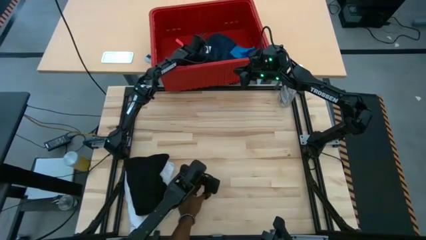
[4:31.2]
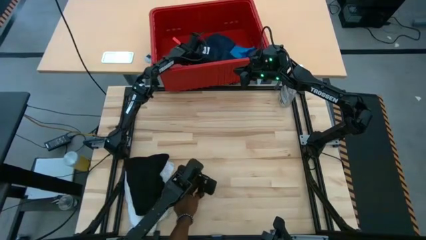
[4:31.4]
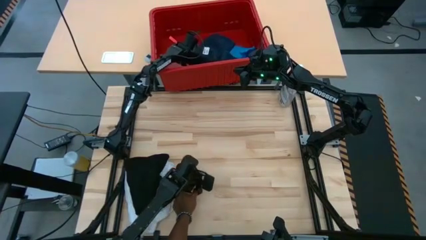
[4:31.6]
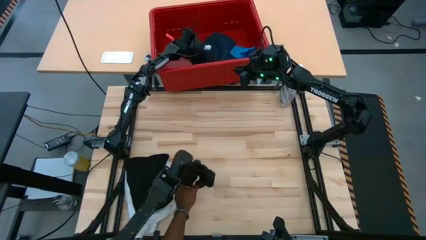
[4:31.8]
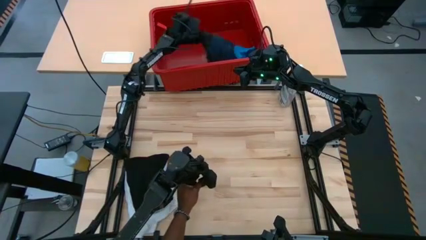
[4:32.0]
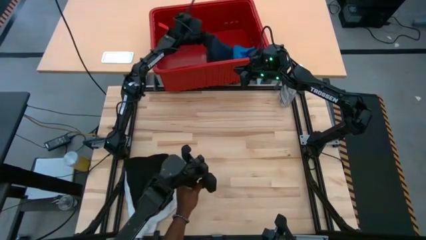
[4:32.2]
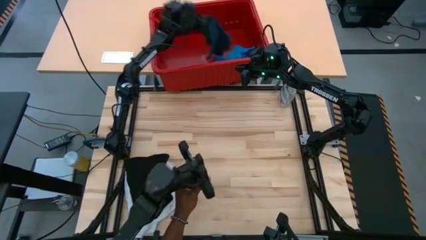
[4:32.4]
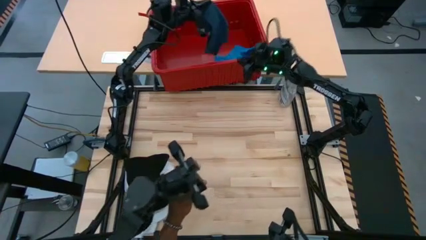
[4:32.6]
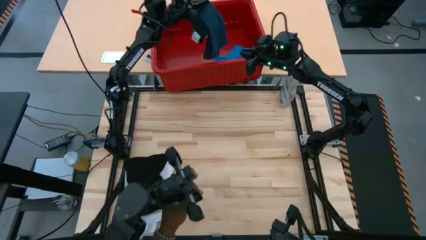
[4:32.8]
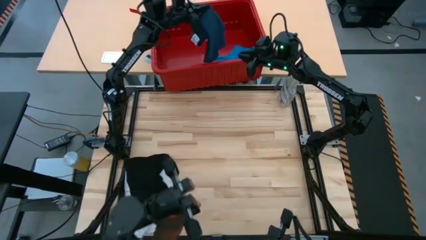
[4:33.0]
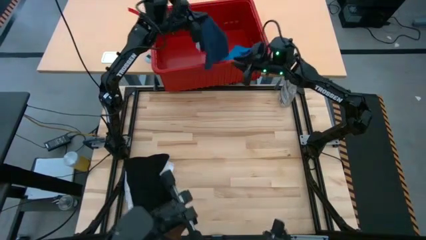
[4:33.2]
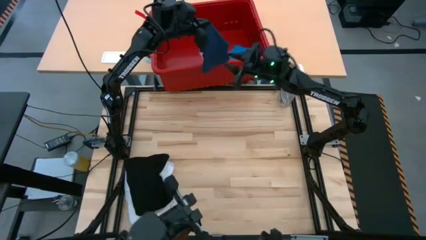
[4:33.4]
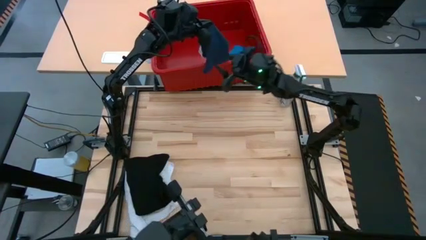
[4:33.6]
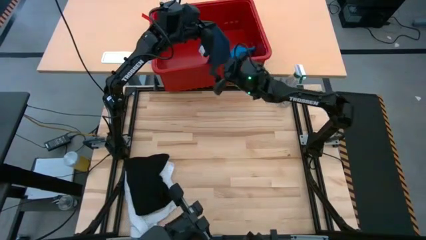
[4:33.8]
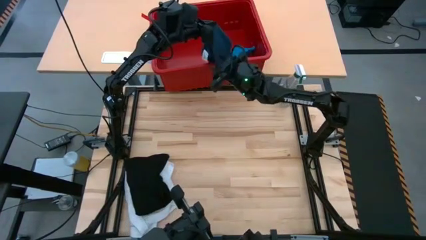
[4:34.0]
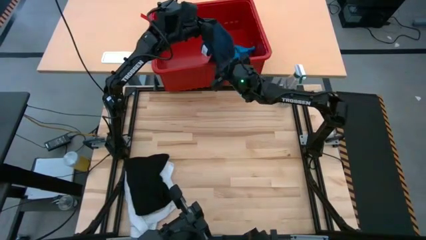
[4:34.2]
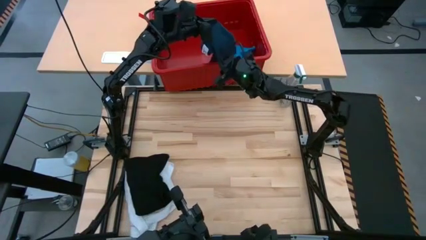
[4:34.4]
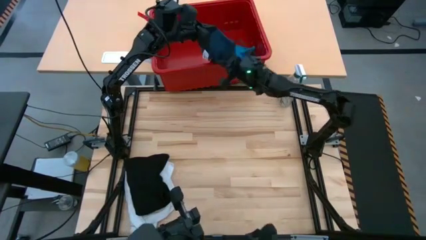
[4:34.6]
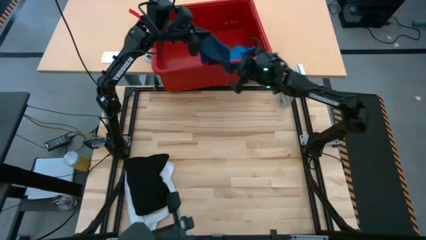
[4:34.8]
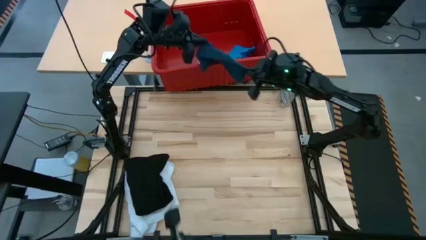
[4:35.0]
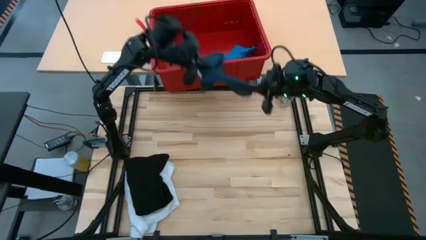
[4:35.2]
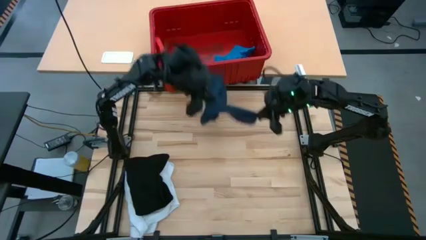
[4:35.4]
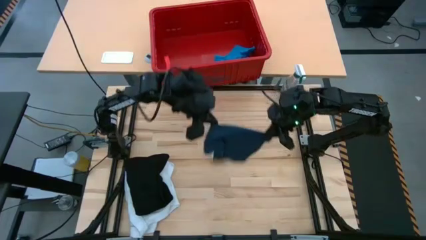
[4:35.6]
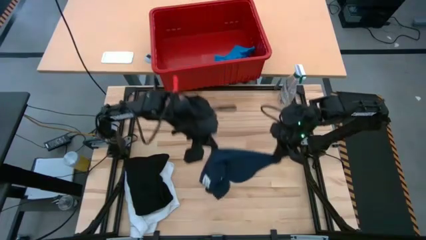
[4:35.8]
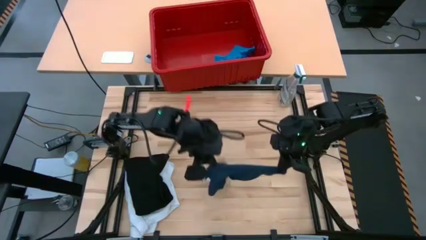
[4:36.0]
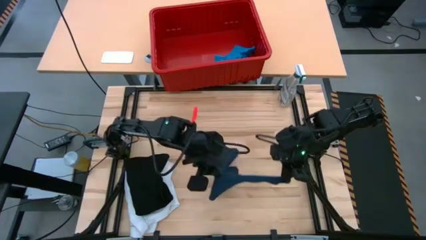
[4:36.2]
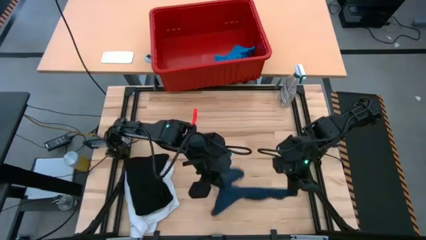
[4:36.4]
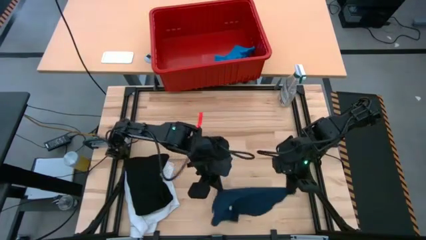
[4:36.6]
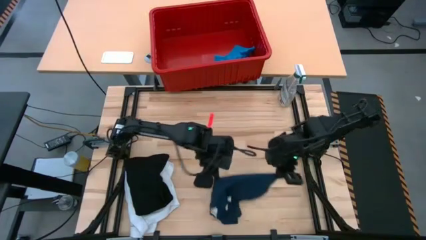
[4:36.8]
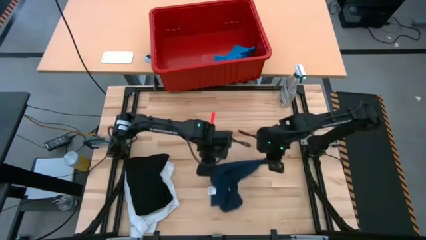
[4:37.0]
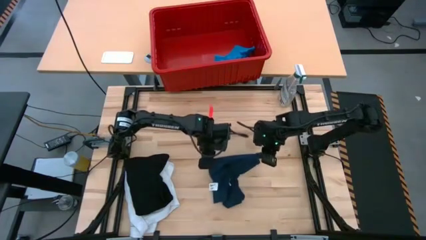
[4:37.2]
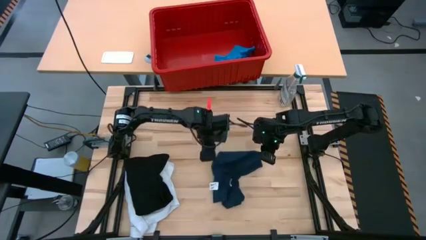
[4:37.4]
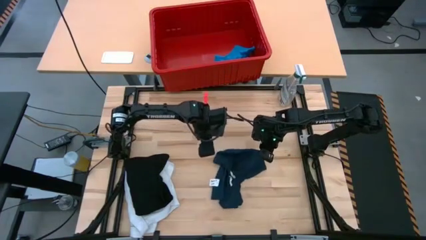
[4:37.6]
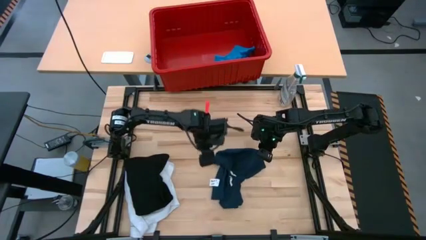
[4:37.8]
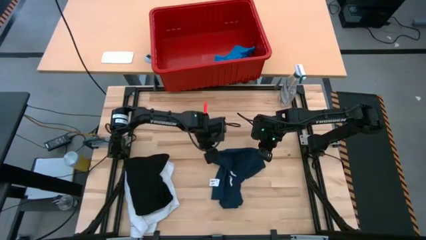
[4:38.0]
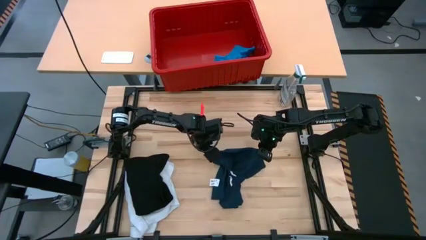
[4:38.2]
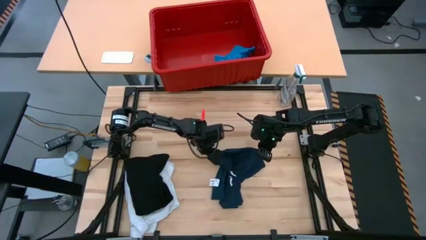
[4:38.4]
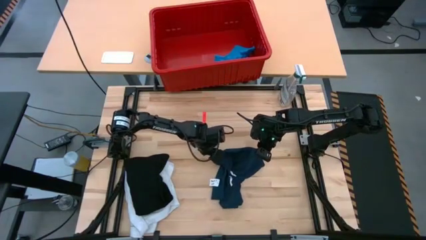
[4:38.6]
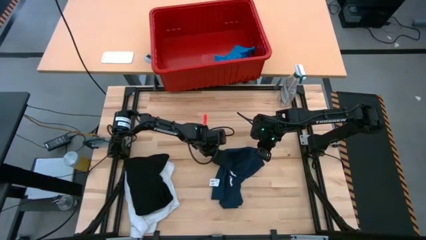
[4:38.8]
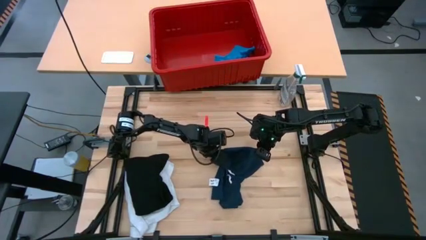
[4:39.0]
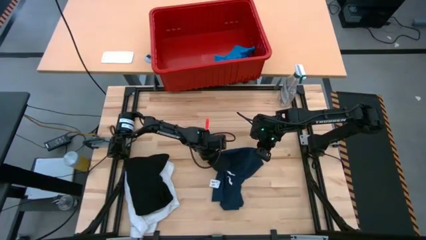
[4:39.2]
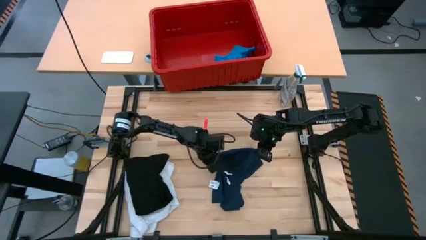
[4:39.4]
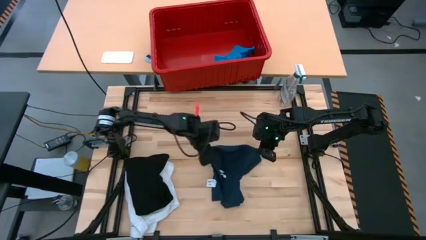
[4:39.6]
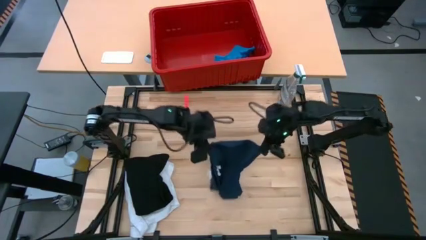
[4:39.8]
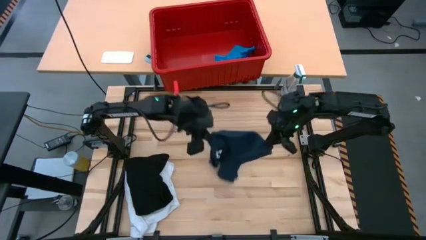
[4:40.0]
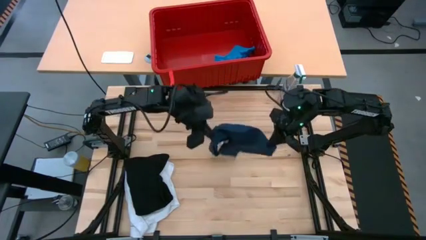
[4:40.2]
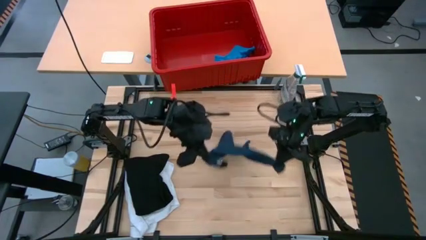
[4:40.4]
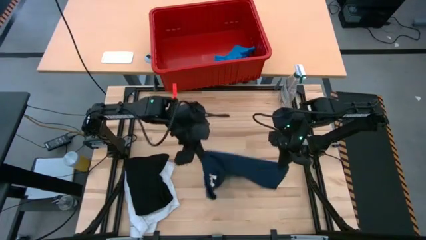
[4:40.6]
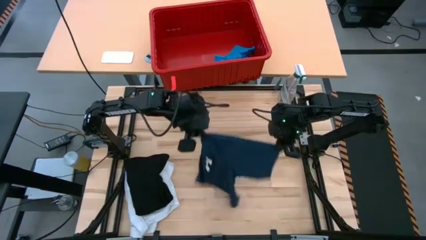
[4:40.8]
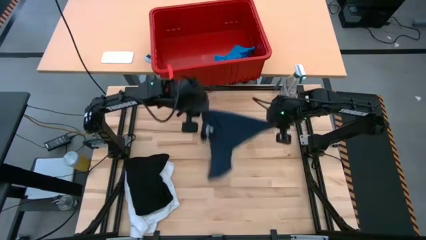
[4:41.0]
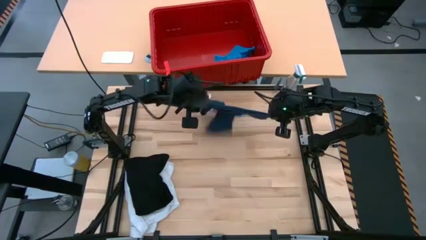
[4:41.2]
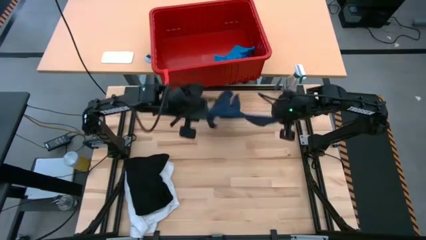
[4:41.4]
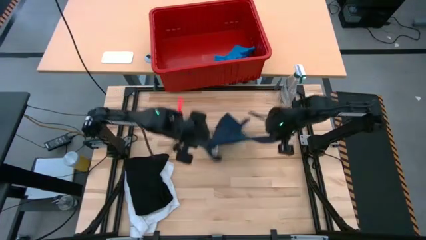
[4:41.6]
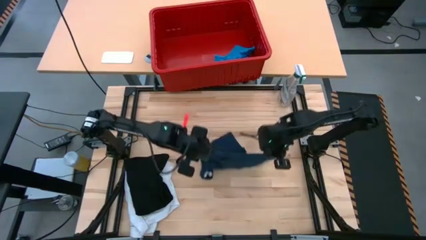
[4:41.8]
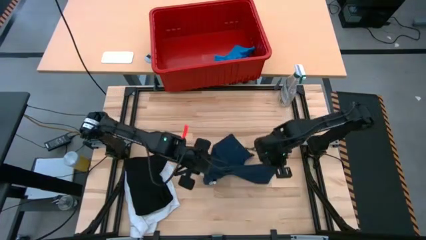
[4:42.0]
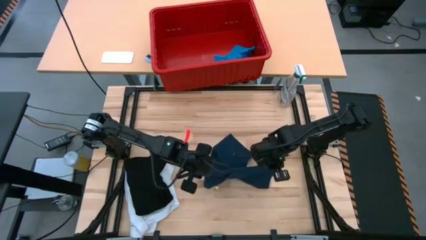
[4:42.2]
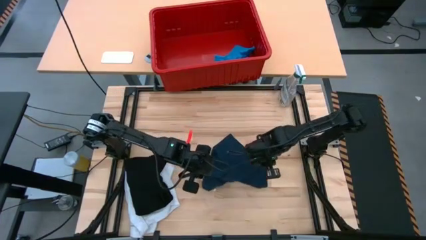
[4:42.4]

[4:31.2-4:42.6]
Task: Fold Laundry from Bin
Remove the dark blue shorts from the red bin and place them on the table

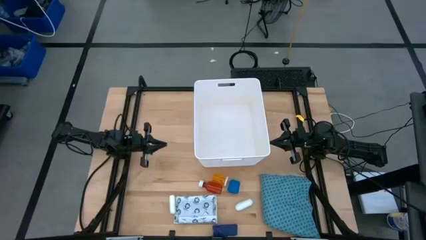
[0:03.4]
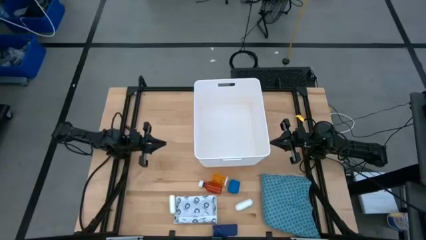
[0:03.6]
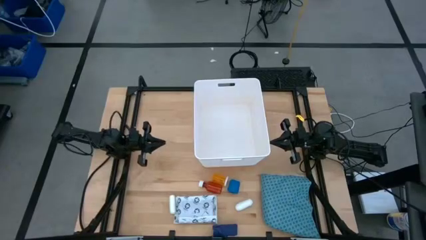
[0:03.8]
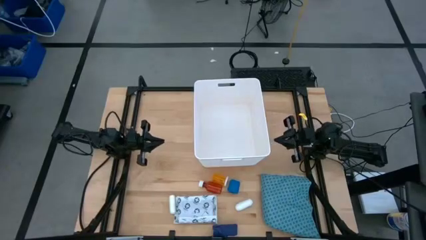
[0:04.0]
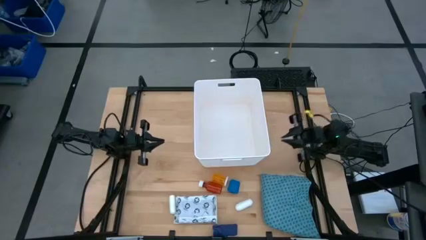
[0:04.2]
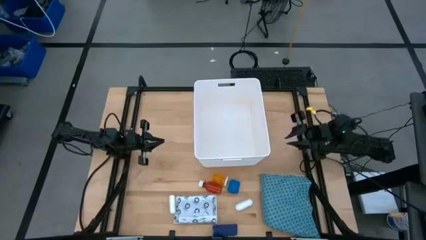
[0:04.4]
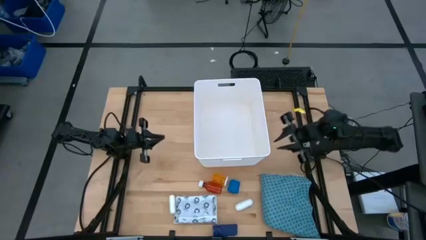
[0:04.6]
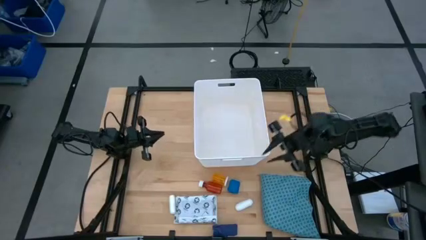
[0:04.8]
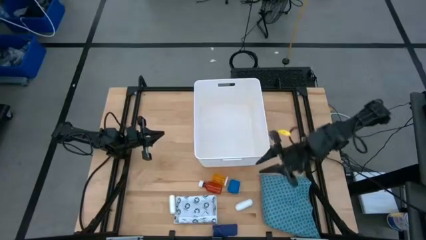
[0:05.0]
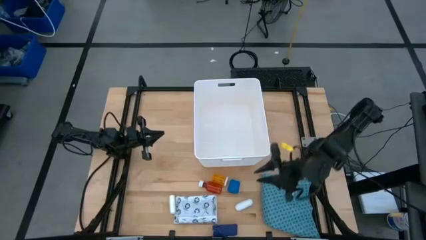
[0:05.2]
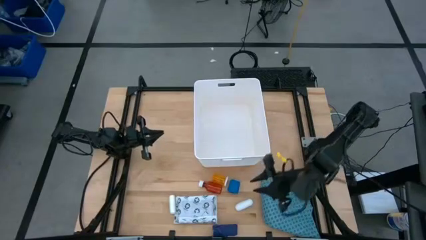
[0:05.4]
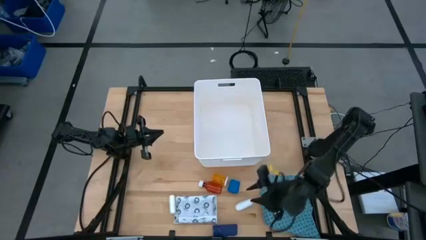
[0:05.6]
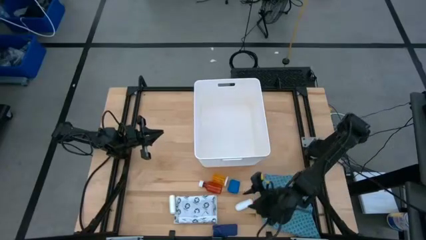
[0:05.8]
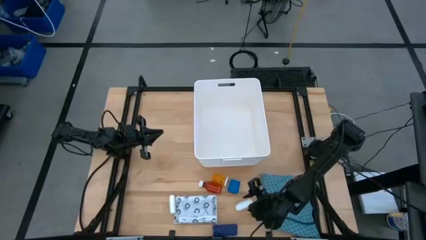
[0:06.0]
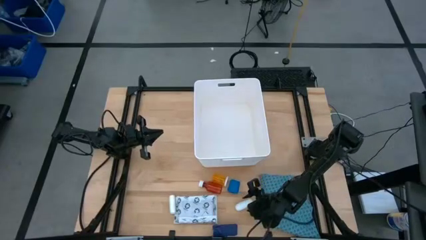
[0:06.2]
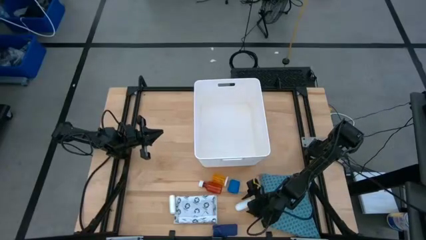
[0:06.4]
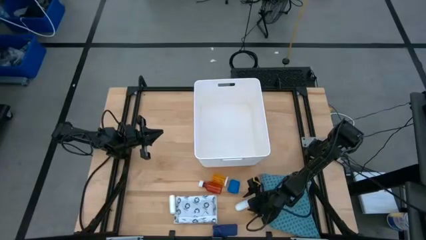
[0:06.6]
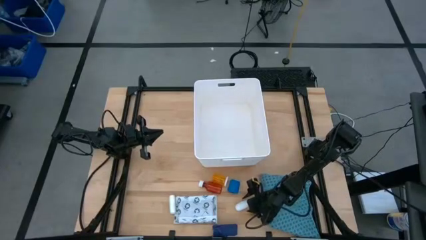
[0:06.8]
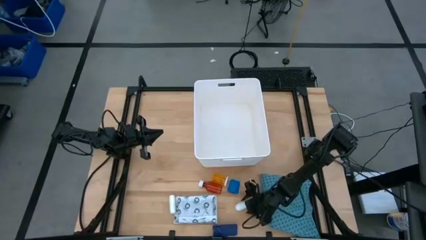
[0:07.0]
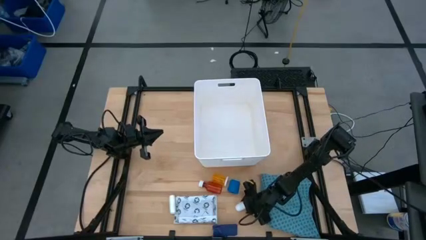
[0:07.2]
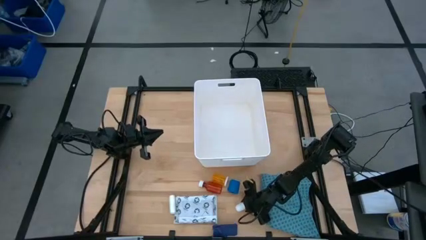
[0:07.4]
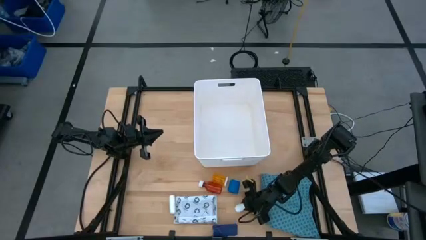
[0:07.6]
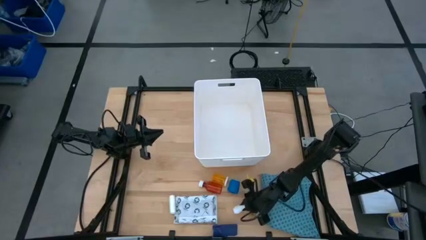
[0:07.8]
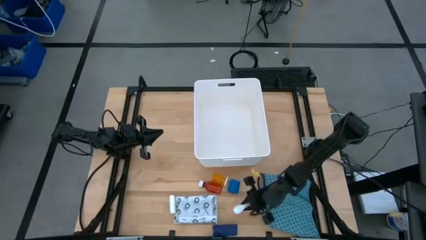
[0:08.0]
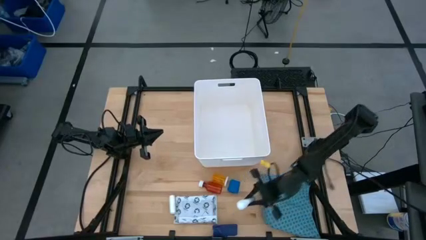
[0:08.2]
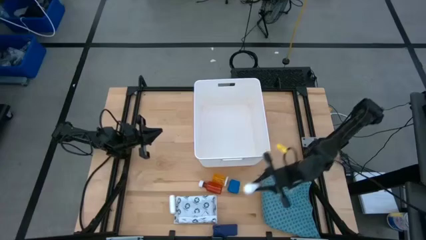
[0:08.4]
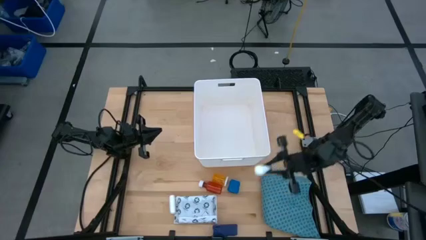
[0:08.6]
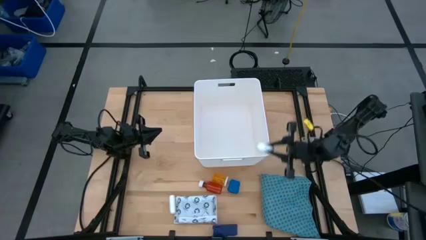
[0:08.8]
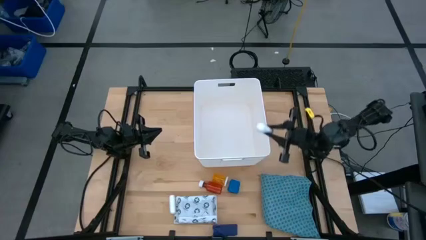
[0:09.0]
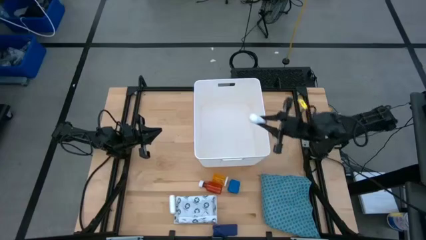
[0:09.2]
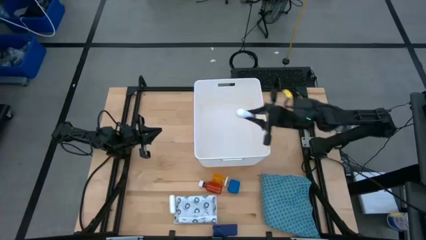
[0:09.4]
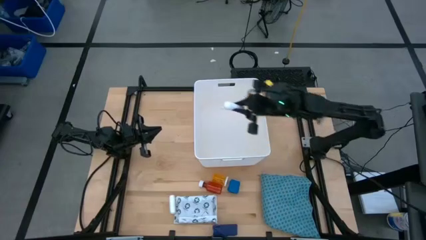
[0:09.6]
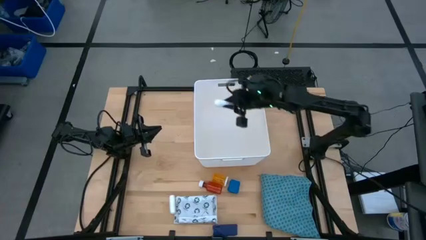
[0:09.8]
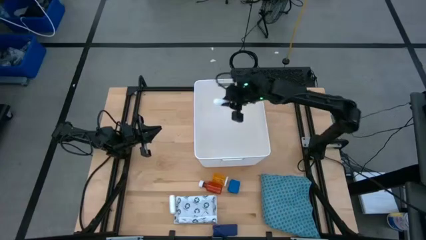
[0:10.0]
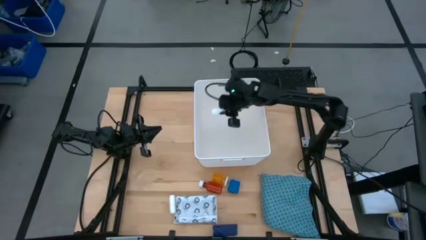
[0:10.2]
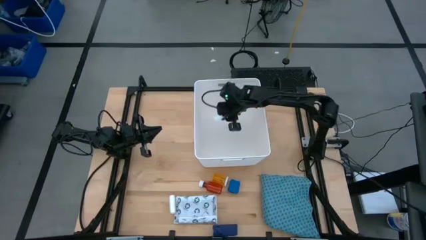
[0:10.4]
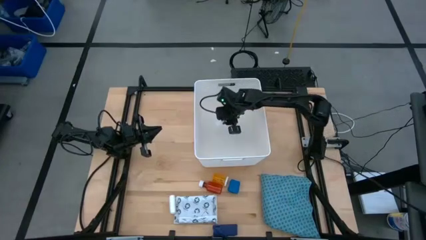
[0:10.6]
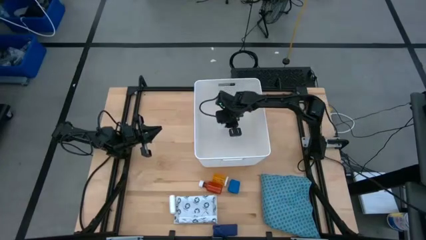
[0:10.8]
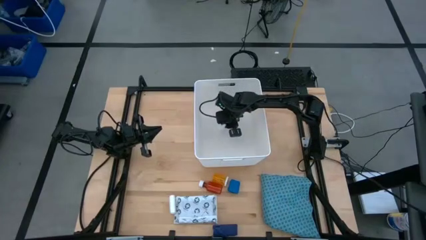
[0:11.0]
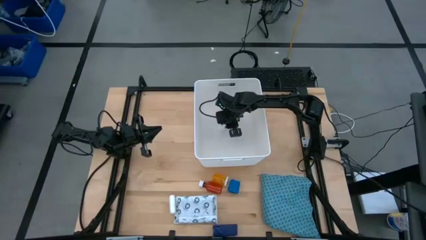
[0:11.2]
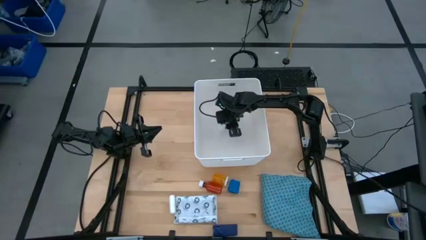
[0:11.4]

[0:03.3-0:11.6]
Task: Pick & place medical supplies in basket/bin
Put the rolled white bandage into the white container
